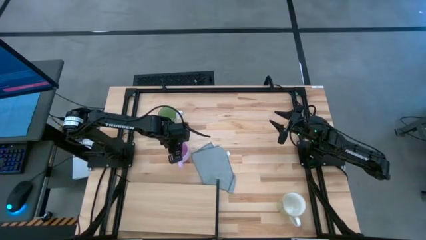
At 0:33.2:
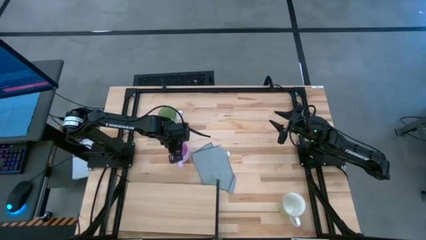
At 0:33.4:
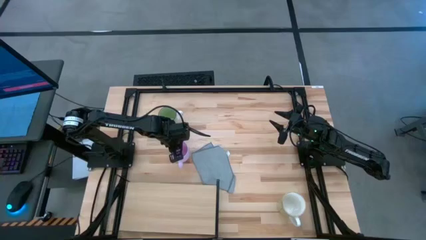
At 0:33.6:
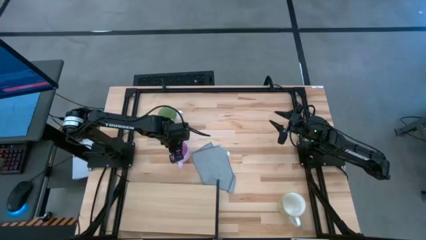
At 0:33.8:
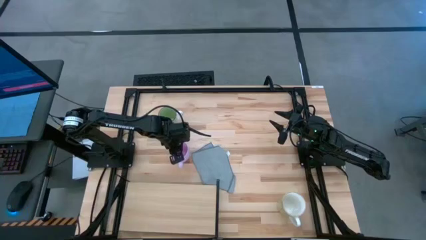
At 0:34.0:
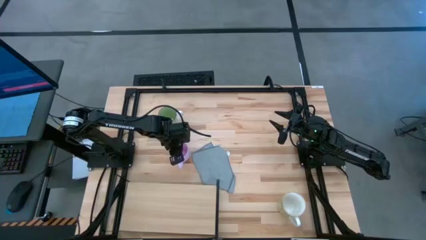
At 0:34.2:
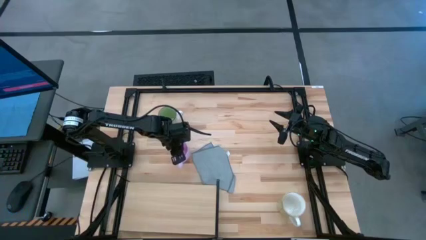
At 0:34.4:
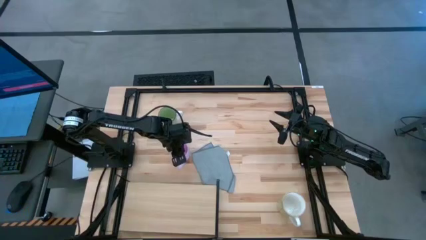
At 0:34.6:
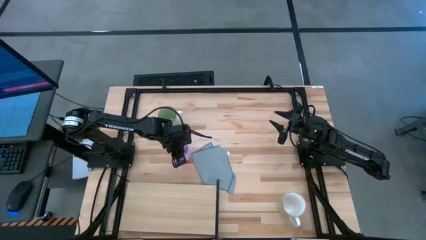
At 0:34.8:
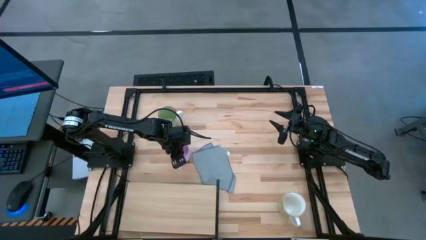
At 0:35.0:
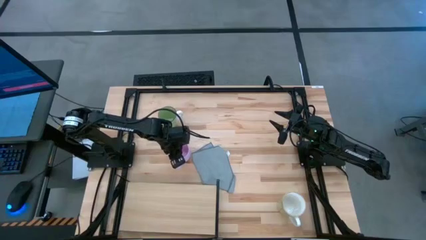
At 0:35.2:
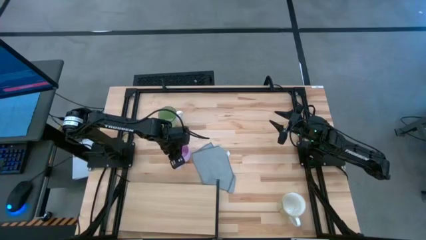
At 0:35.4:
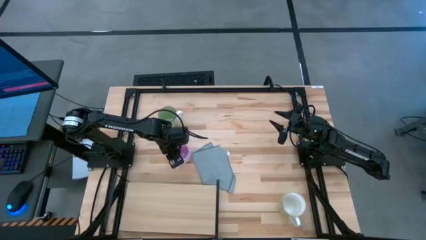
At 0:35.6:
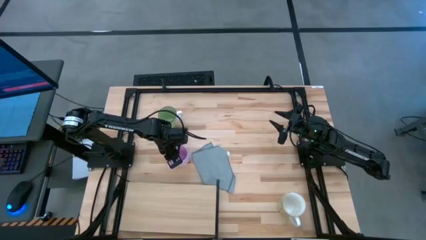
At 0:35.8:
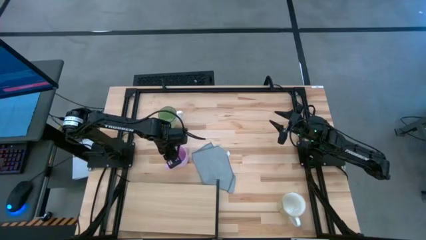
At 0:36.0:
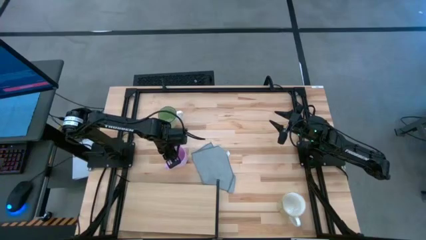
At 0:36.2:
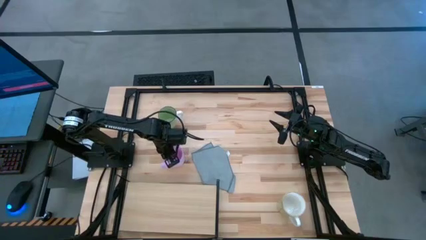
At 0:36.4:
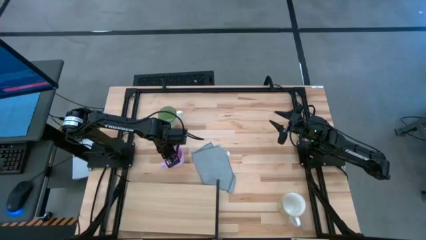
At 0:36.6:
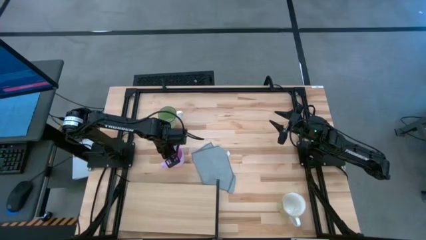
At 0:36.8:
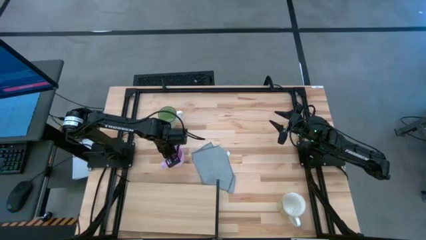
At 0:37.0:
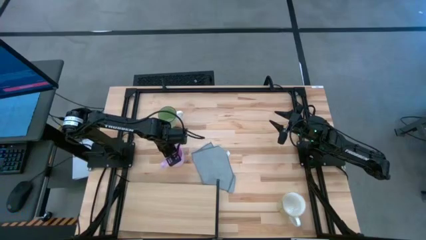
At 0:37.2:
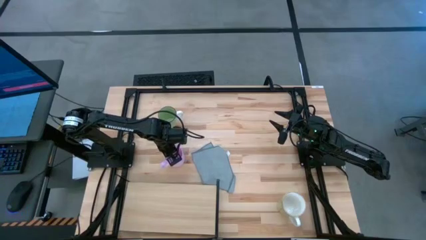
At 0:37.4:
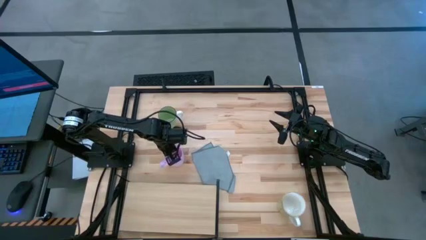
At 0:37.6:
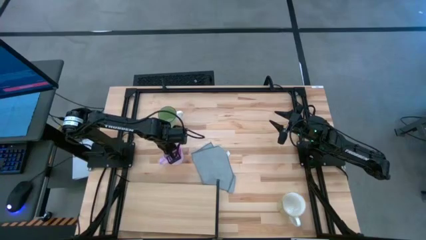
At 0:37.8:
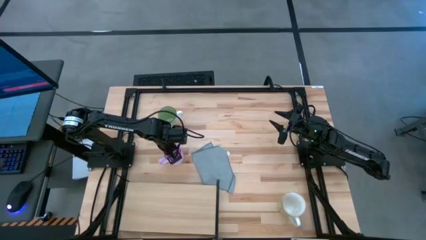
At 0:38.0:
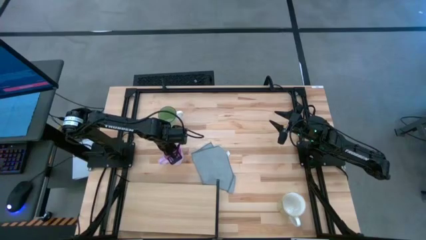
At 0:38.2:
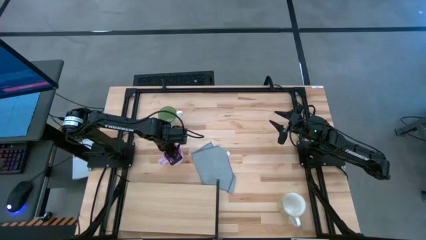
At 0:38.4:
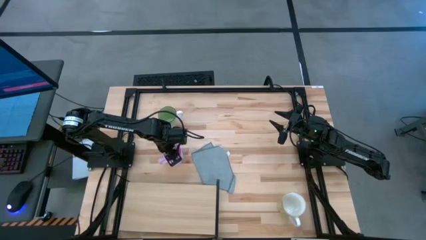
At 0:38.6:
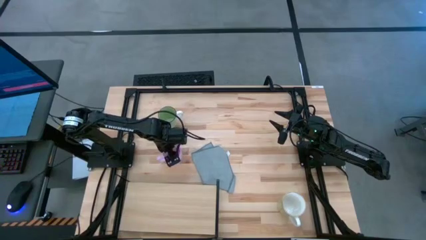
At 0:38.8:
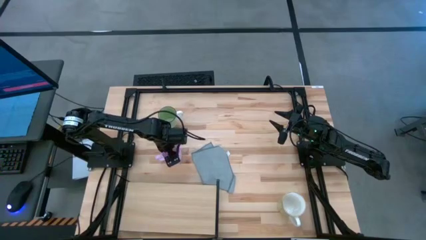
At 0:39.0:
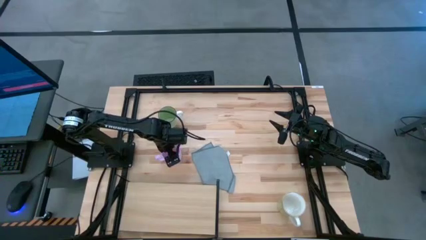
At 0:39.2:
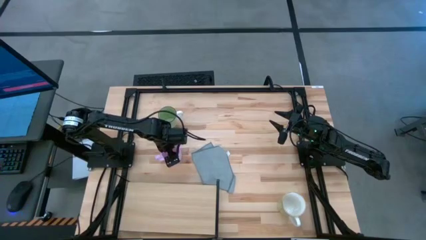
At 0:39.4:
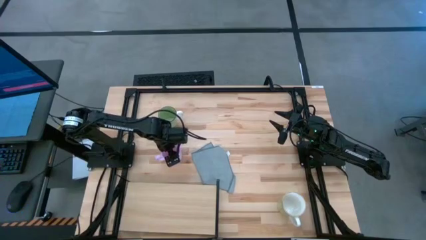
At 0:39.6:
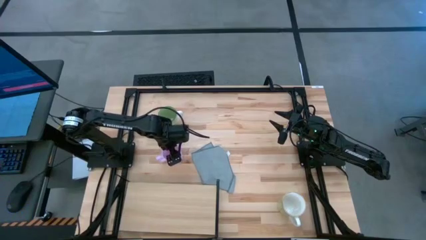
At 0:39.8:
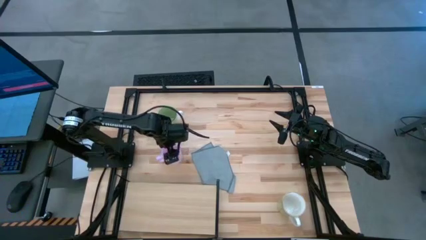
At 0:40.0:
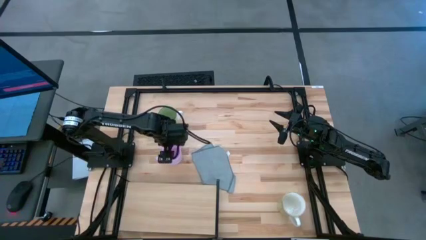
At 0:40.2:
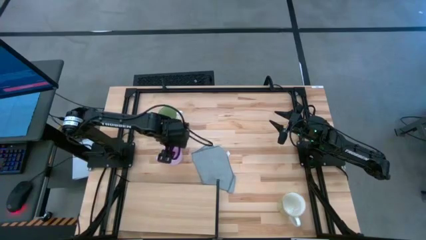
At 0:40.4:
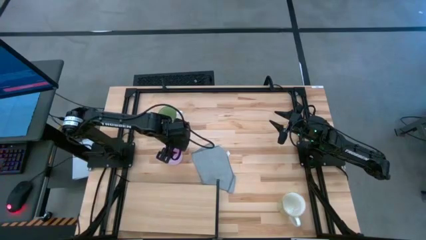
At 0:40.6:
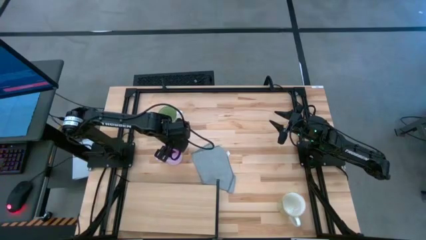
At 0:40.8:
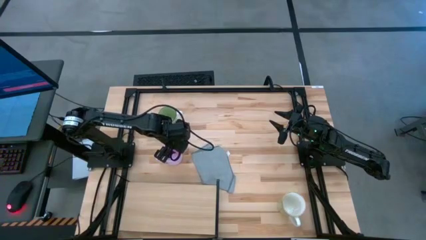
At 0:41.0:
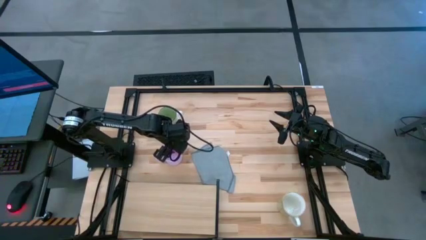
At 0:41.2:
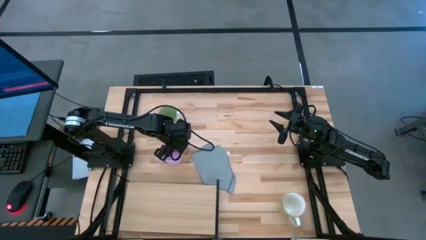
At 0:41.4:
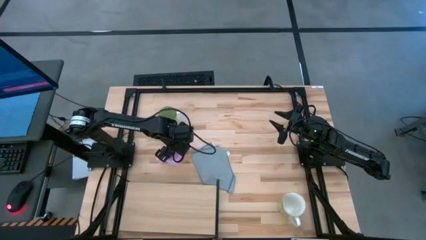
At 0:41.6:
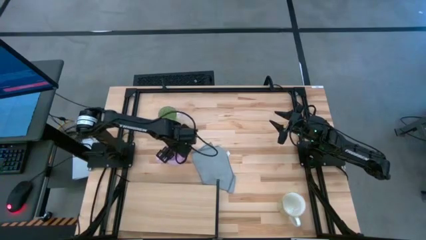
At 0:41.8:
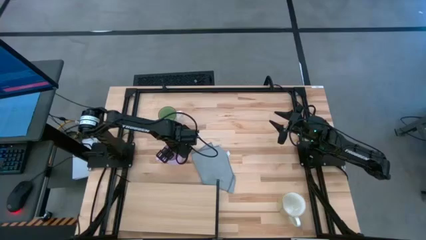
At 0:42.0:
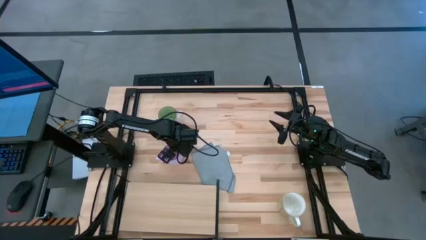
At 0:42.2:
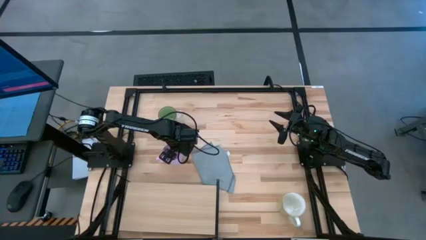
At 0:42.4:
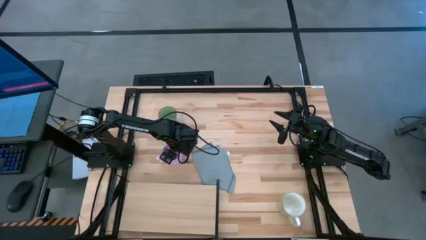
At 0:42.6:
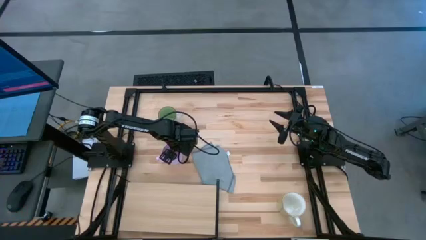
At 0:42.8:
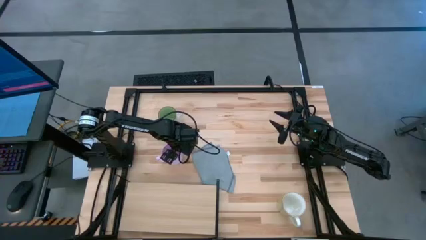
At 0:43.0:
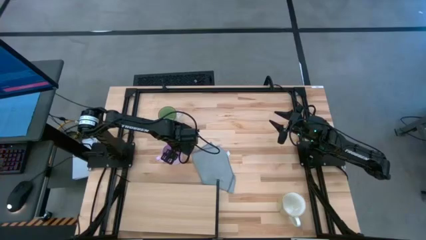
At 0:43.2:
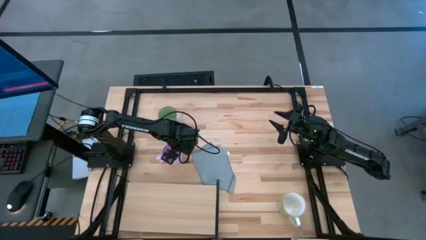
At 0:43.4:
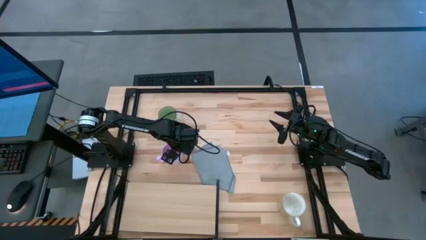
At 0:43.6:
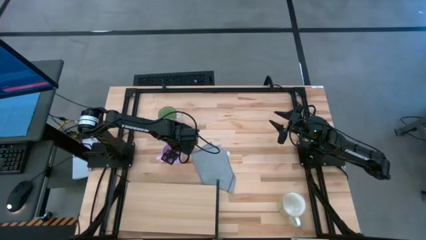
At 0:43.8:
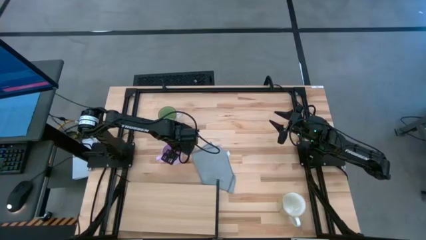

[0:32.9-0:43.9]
Task: Stack small to large cups/mugs on shelf
Put the pink mug on the shelf
